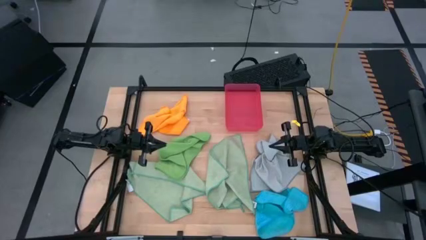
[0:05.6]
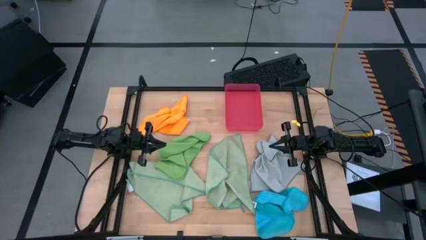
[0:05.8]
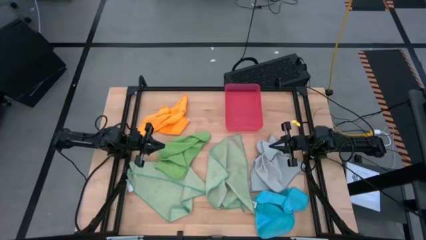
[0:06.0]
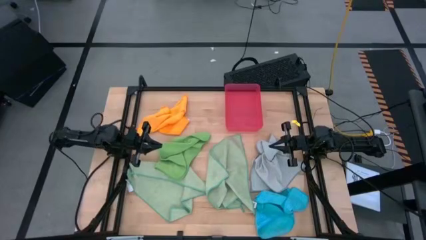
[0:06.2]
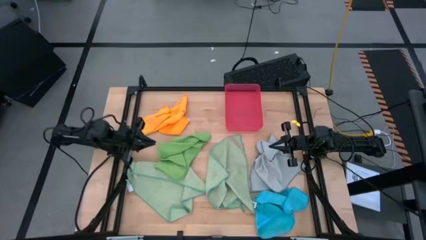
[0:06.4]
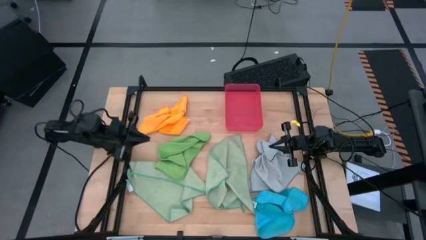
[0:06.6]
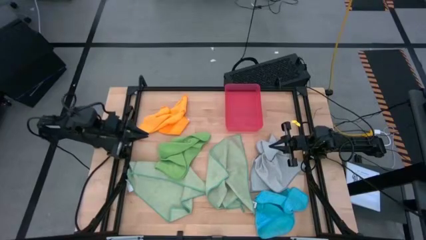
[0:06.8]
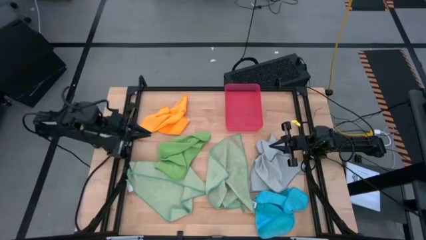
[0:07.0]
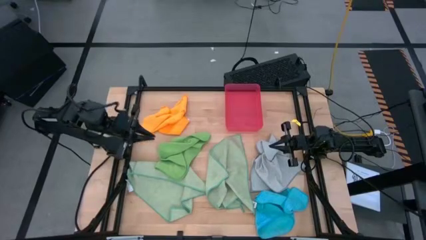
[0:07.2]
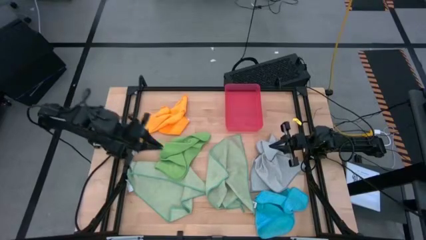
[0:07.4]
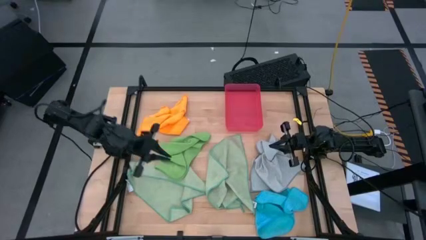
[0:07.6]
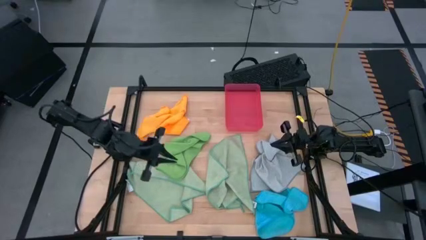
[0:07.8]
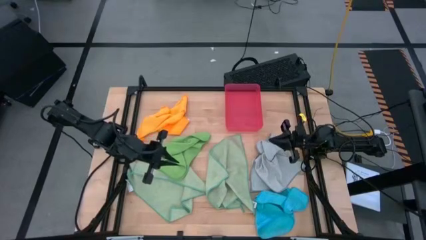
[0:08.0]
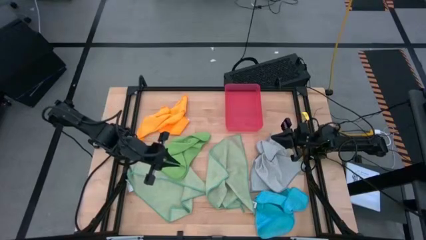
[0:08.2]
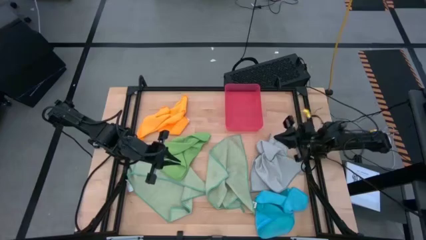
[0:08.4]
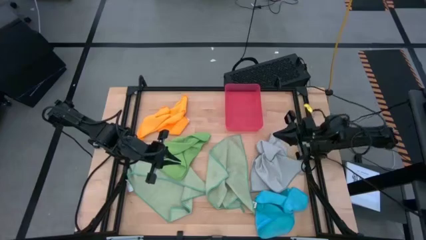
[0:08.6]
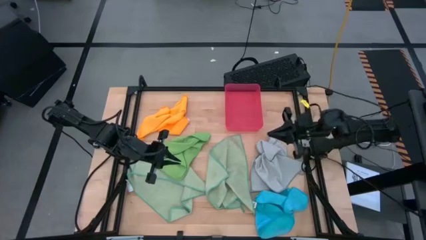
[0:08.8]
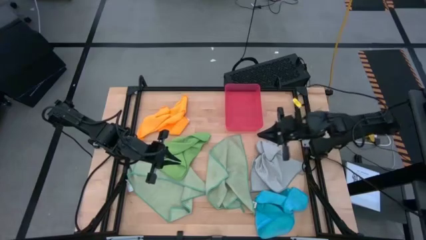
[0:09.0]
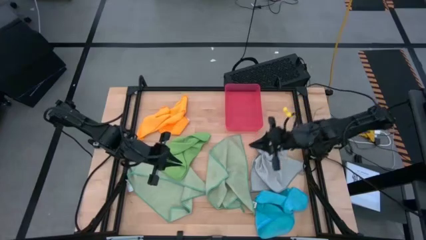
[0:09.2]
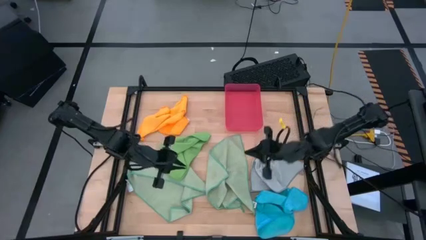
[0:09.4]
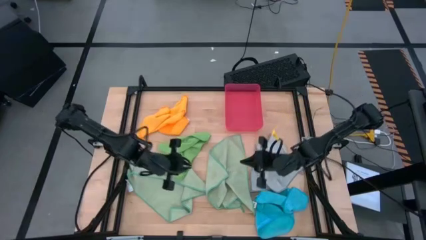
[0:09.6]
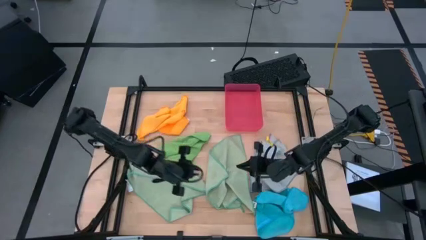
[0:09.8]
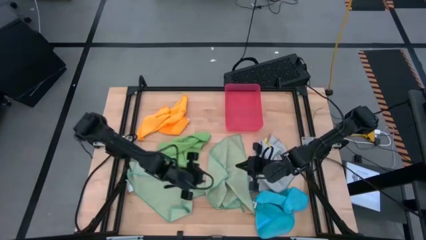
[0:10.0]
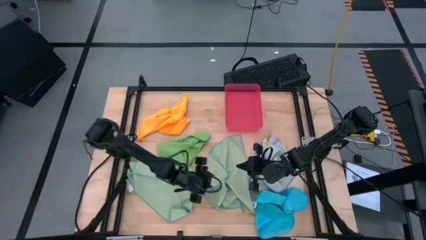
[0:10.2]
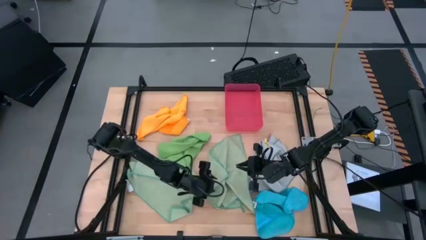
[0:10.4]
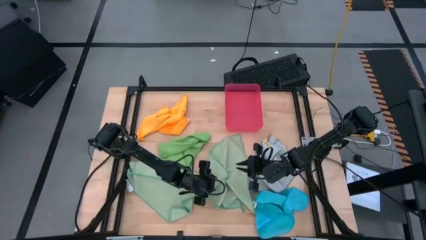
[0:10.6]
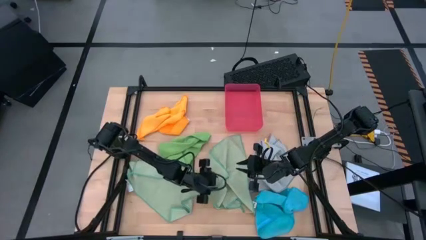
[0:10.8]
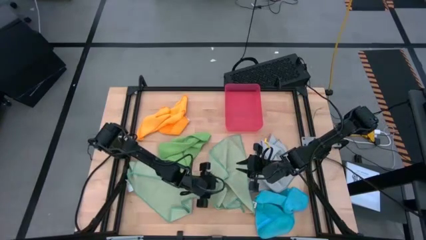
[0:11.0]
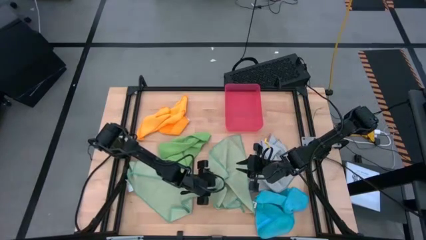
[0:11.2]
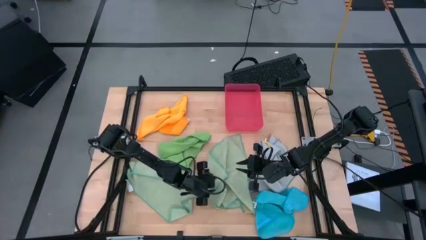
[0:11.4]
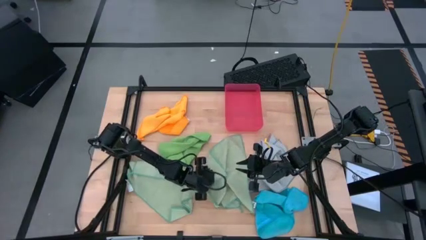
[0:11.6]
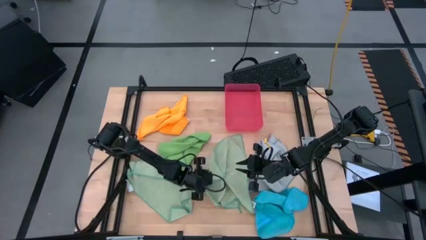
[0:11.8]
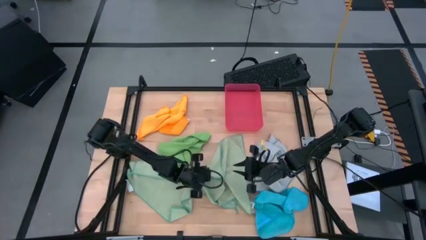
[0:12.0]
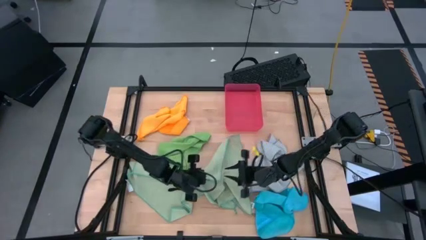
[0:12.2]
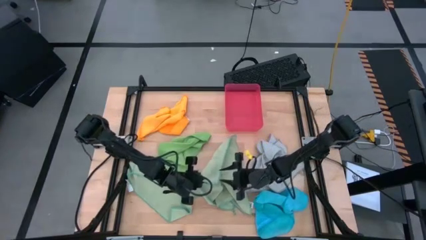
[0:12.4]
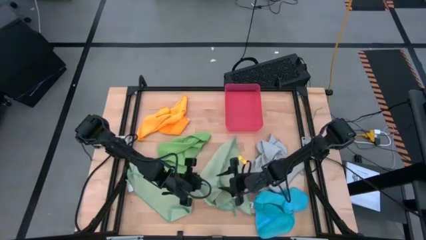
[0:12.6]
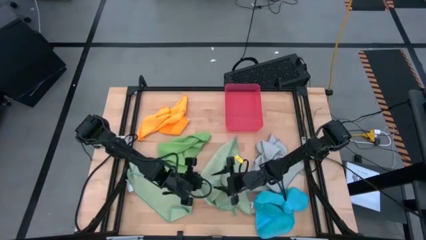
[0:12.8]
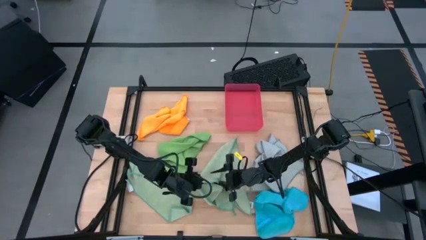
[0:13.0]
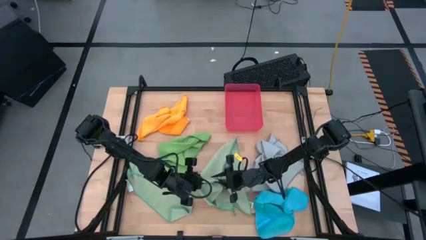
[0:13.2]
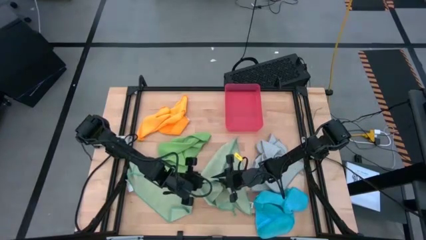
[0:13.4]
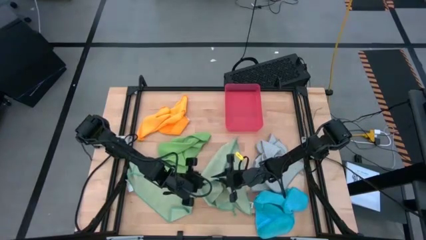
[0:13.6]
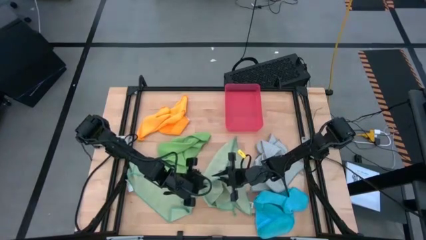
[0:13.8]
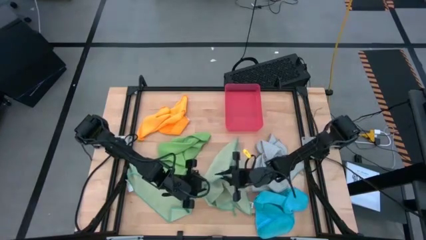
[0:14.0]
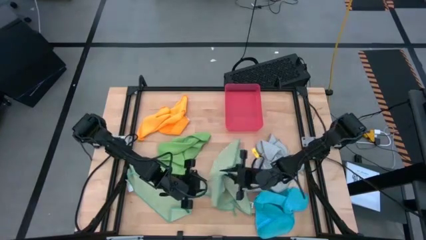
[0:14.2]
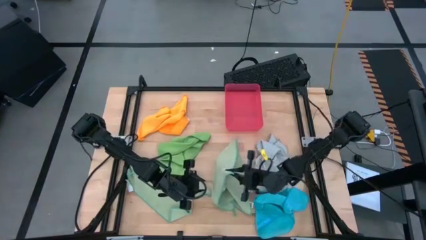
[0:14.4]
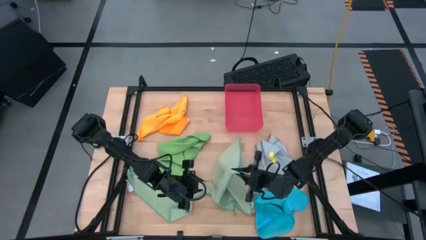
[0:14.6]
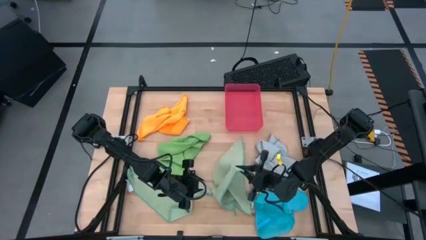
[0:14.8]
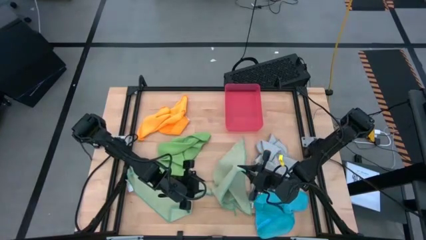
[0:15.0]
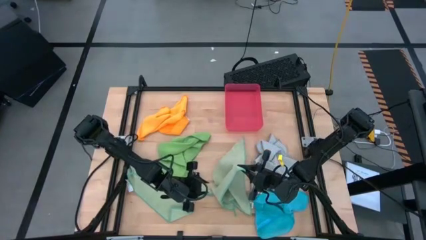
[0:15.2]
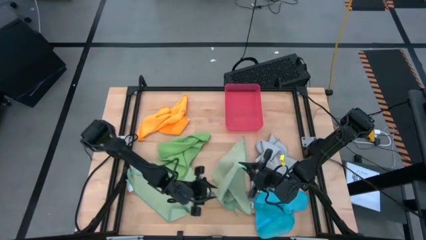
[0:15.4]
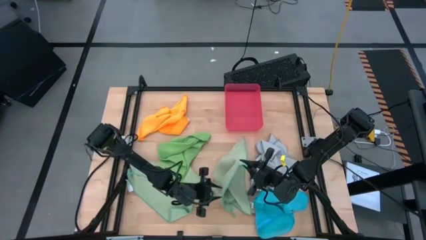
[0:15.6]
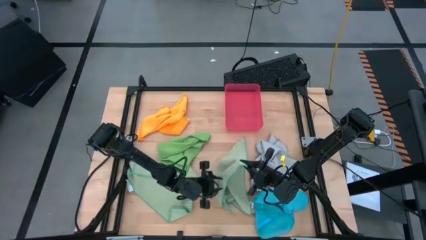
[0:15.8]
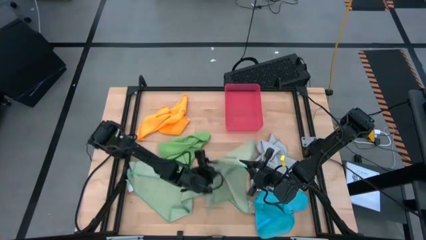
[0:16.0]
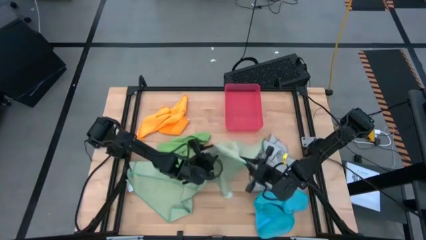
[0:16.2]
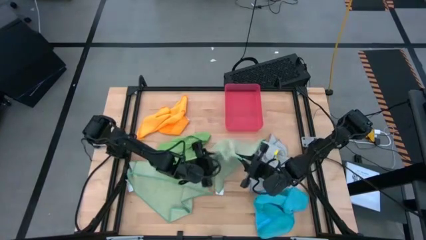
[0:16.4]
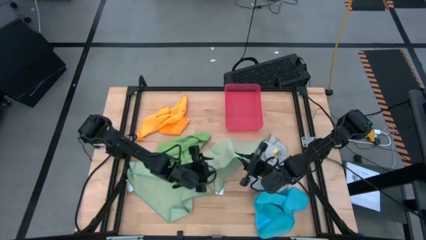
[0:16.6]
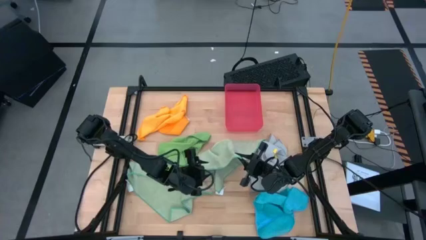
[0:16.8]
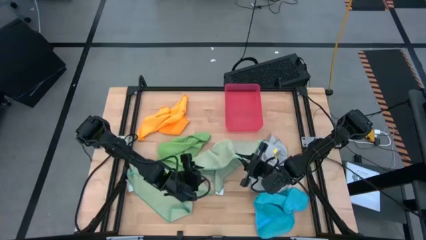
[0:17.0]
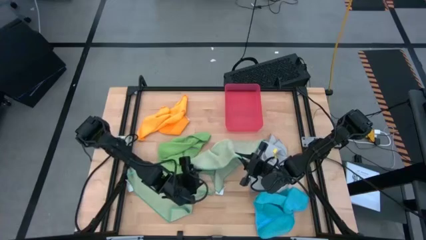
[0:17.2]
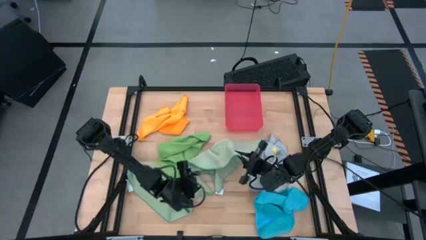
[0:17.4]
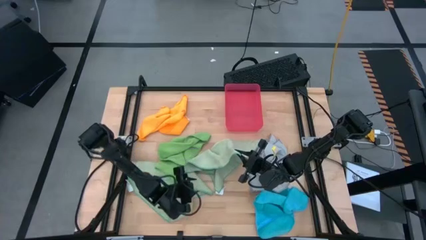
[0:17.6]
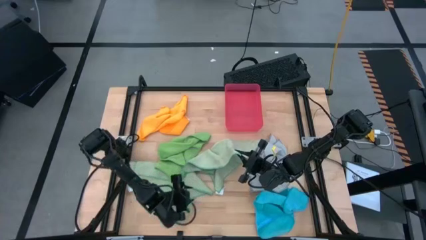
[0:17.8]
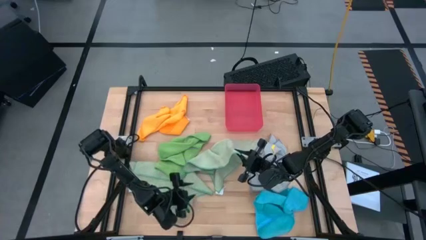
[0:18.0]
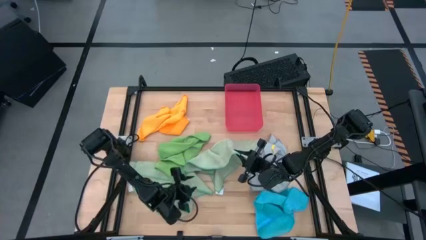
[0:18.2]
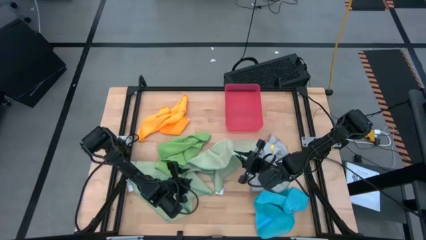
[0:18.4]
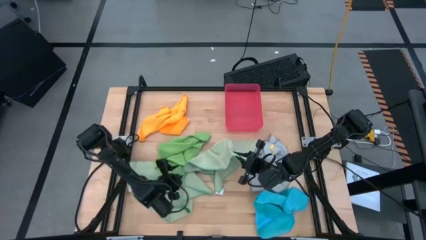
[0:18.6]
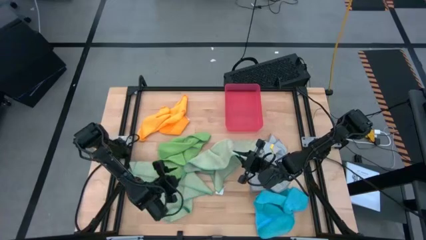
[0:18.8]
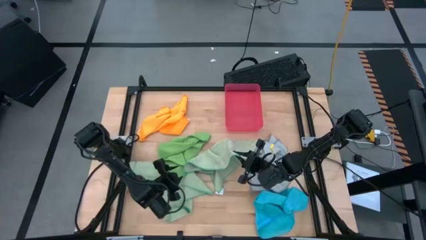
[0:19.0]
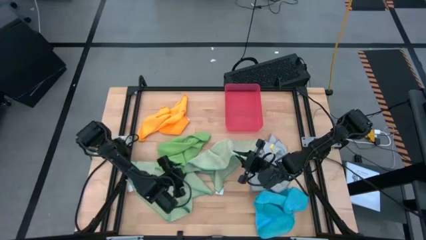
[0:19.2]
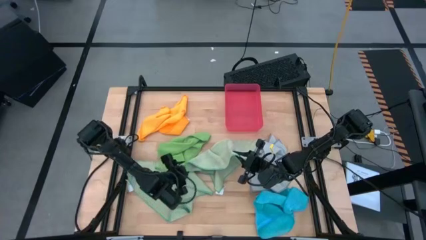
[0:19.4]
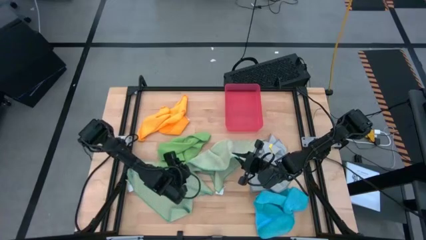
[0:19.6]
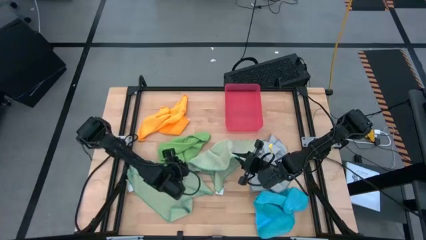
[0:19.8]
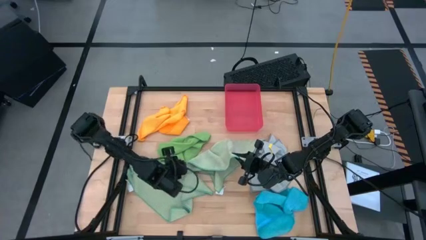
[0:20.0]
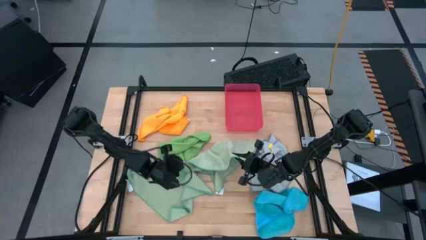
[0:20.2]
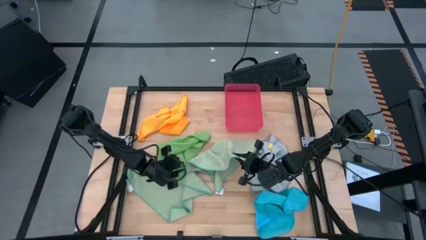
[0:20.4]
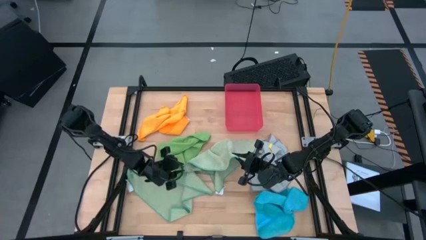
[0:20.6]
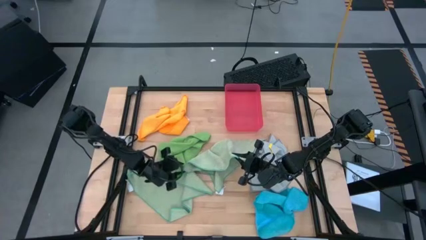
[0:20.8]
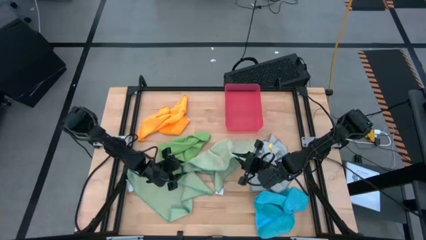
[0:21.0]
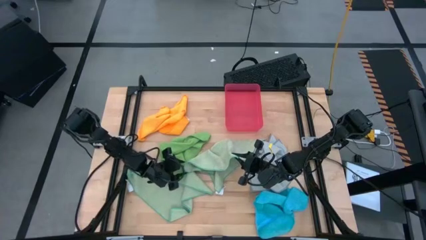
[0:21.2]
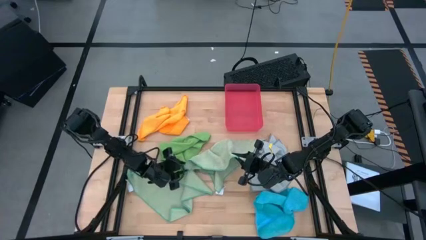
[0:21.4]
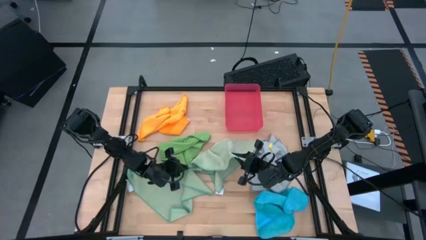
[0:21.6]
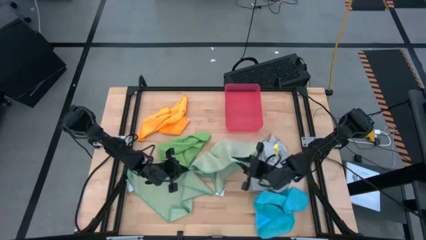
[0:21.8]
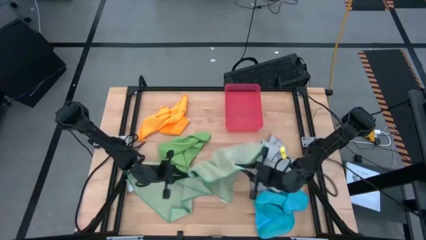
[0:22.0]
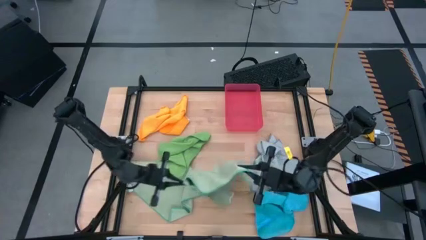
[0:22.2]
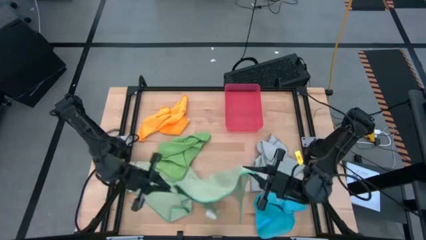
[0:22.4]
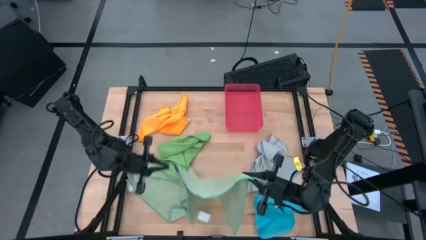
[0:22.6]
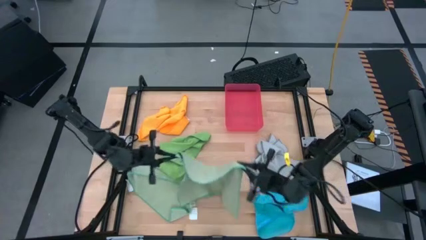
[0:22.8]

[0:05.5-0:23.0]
Task: Fold microfiber towels
Fold the right light green microfiber cloth
